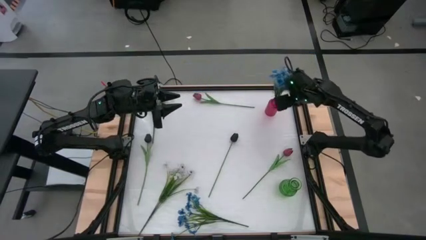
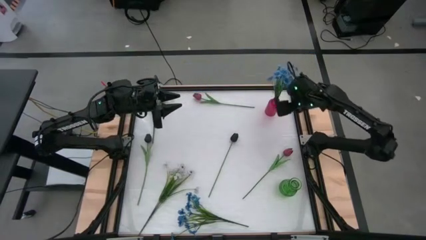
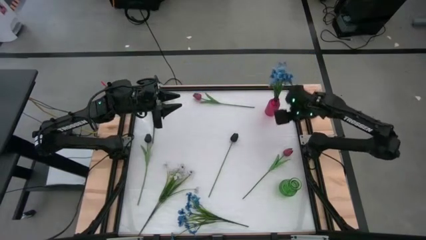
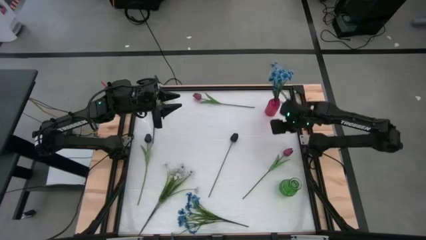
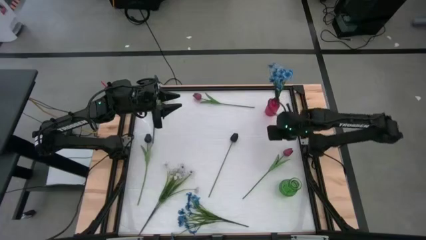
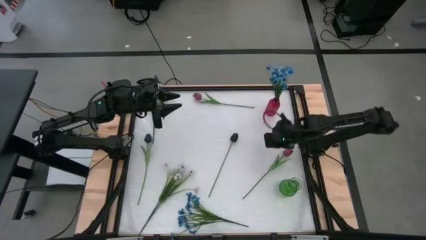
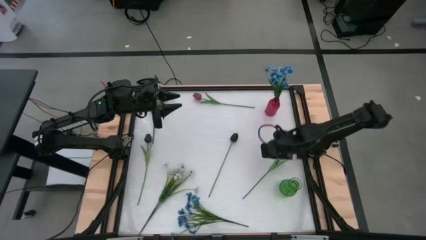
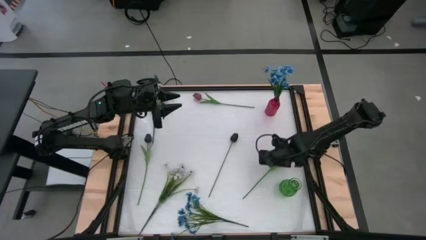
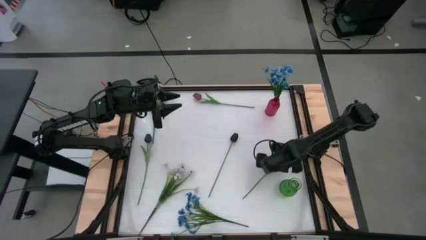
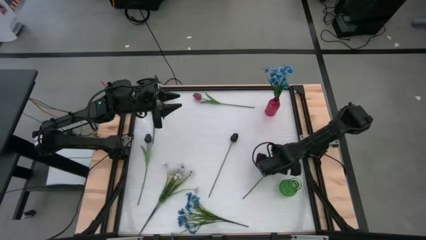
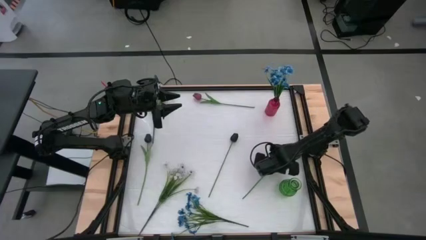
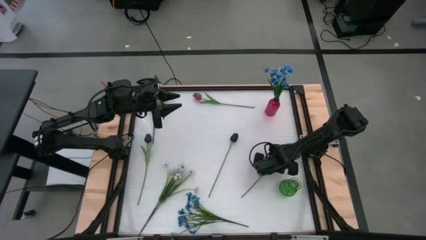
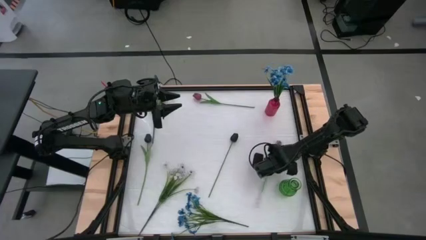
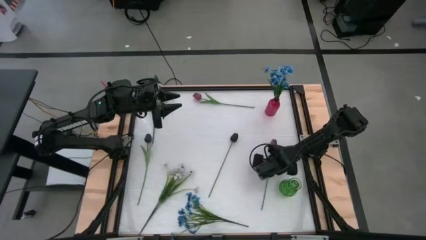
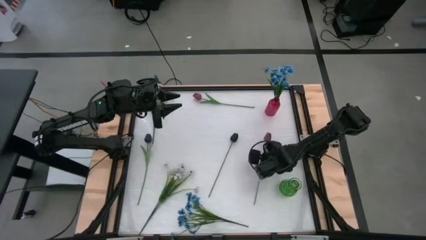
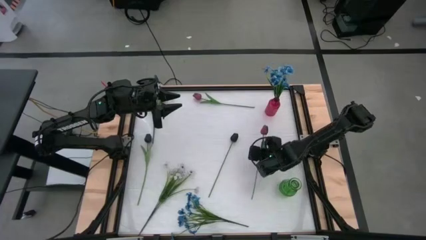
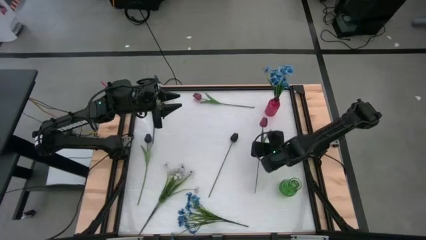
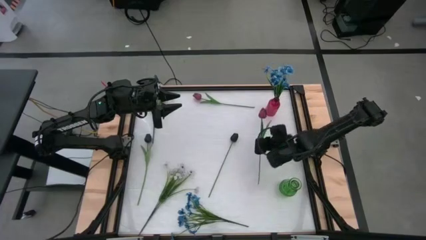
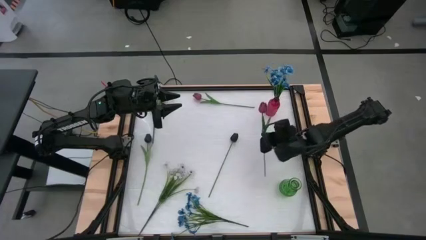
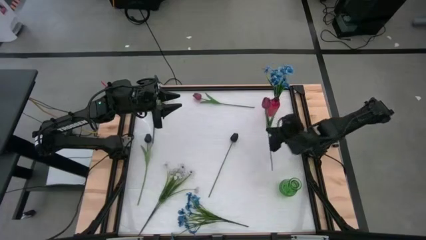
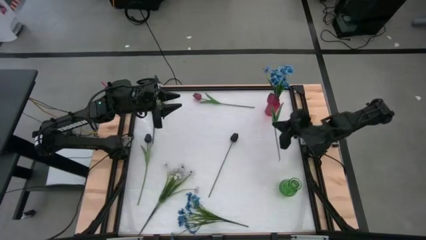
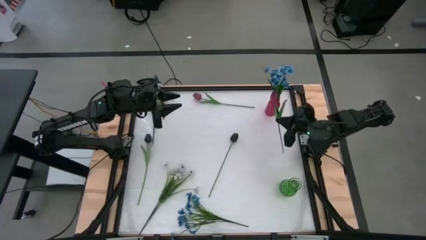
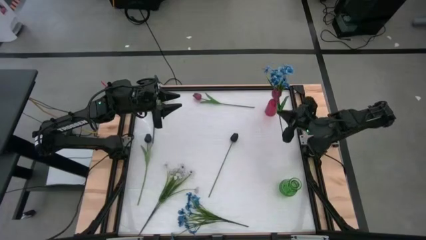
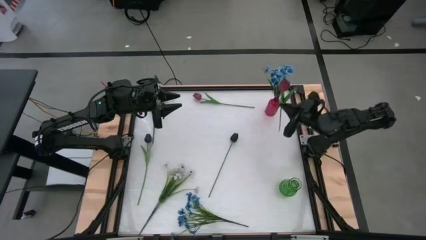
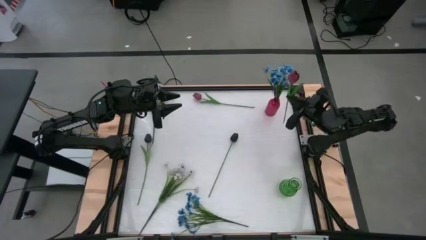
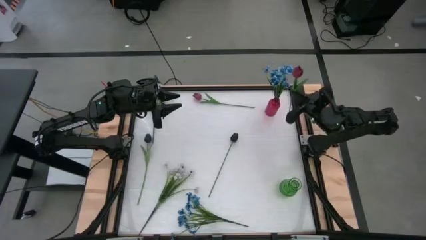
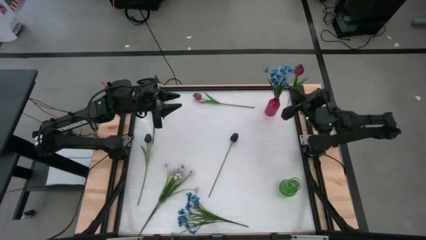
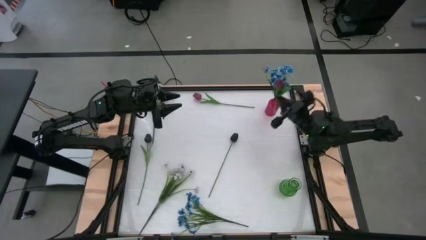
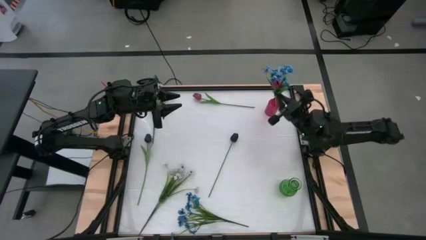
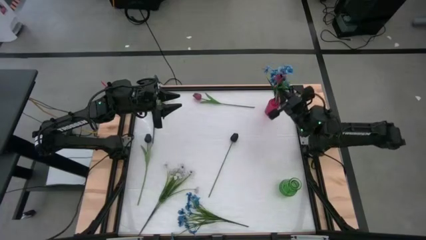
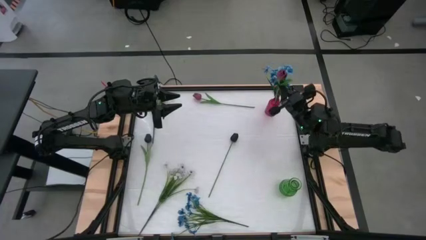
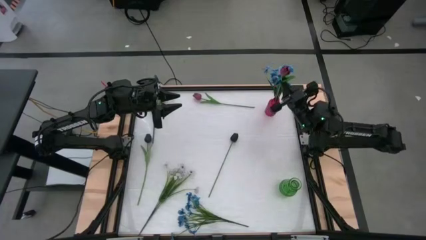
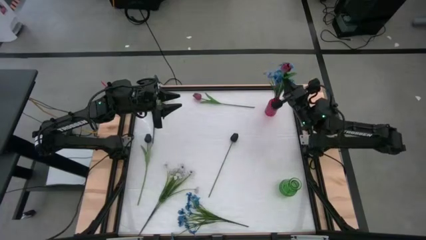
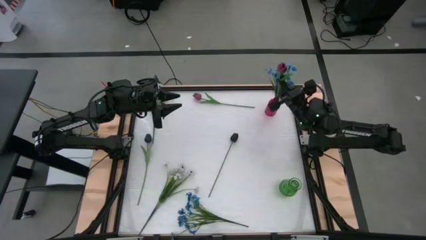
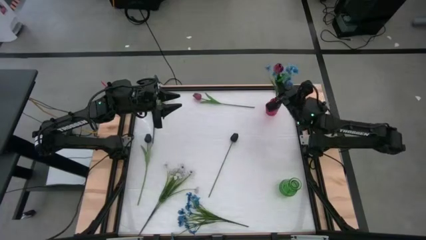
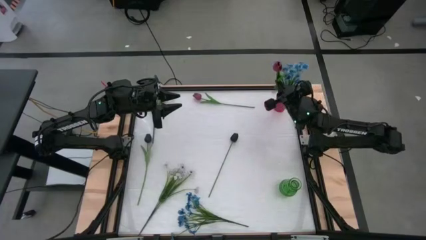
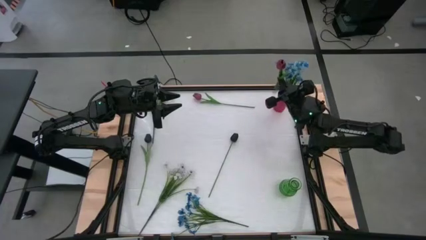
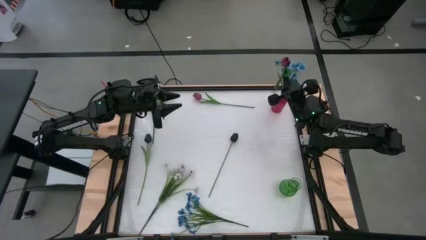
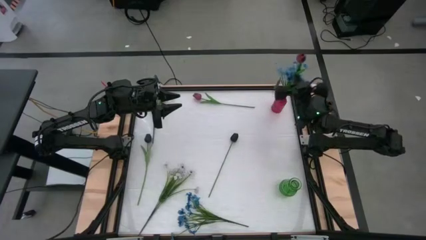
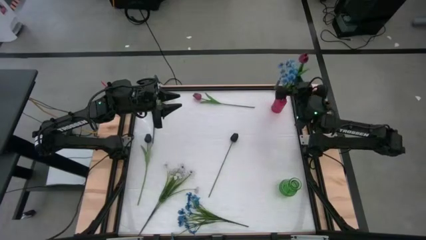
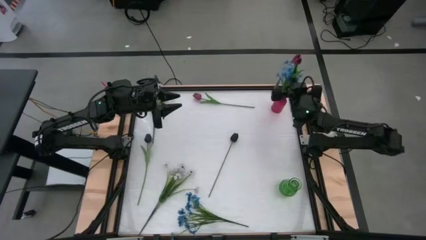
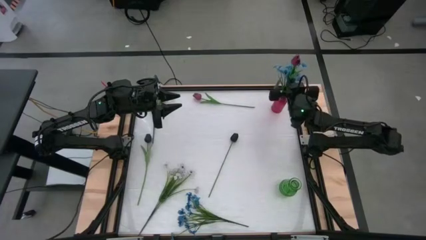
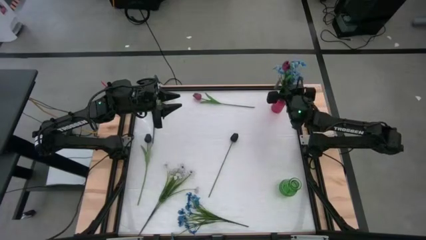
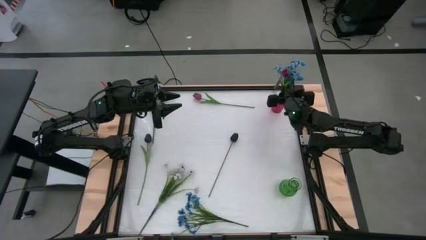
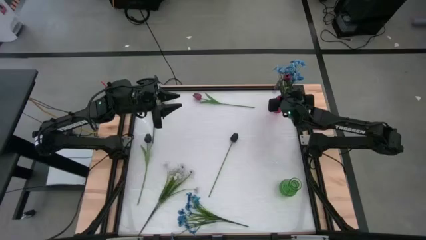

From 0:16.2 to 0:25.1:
Task: Sort flowers into vase by color
Put the bottom pink flower into the red vase

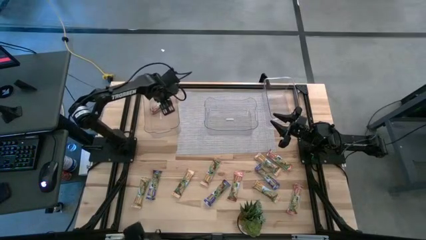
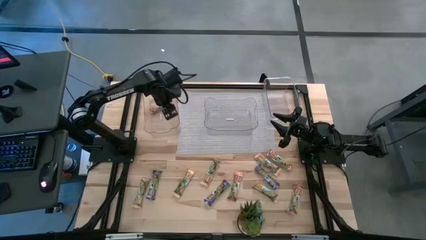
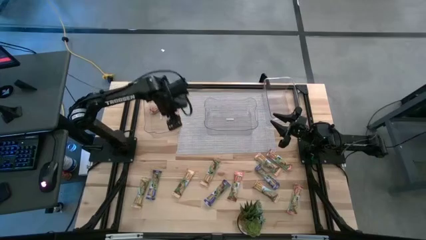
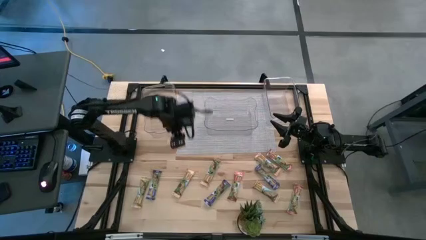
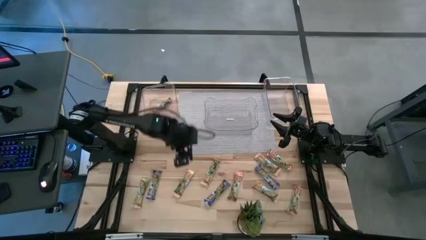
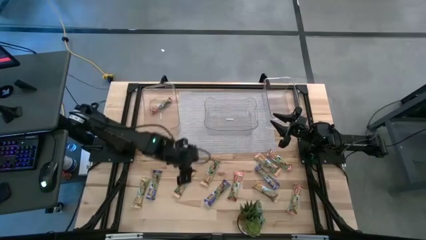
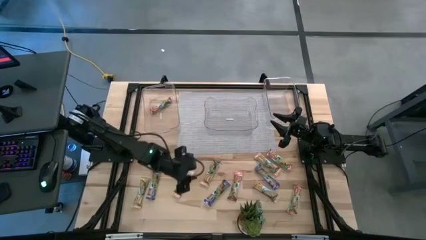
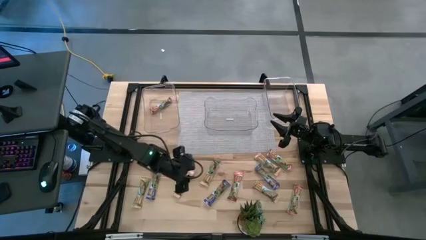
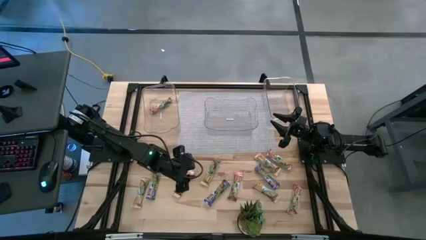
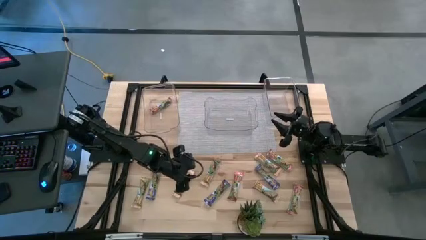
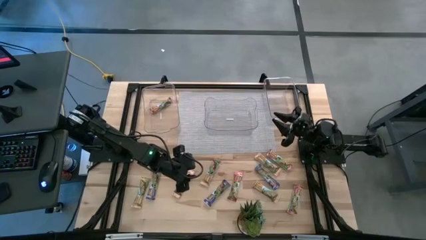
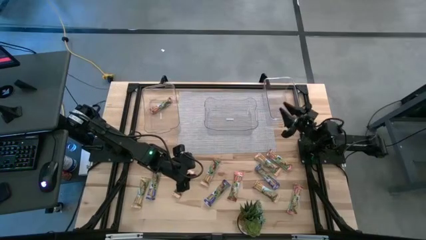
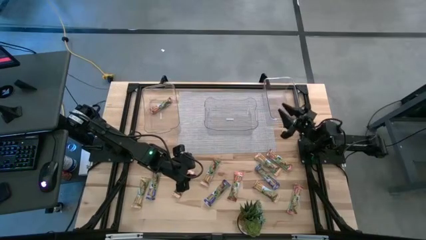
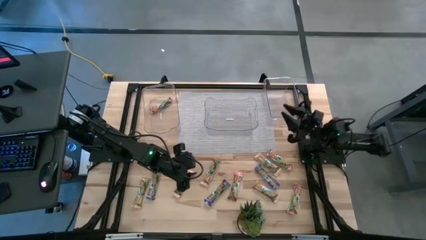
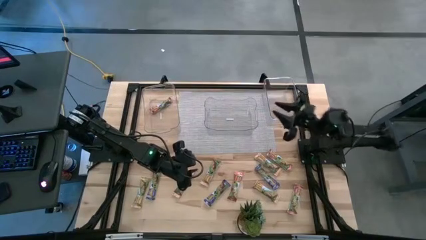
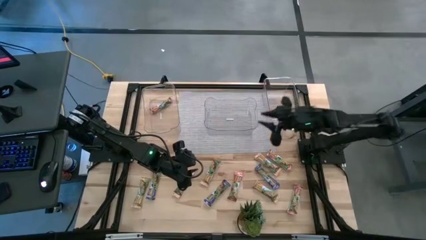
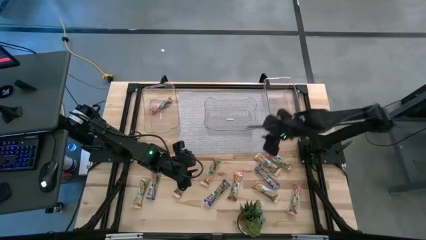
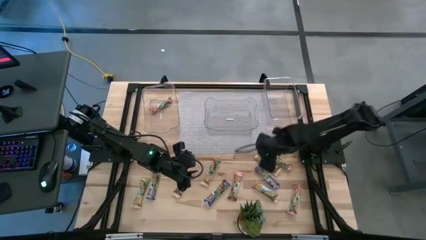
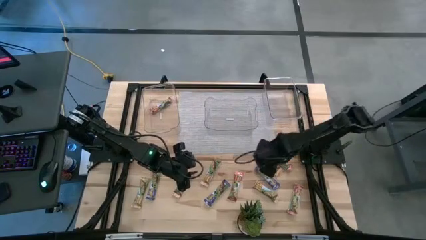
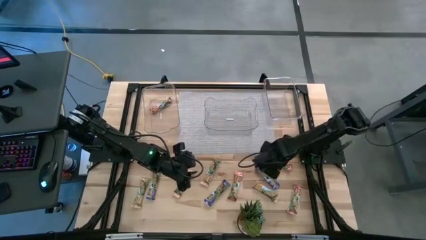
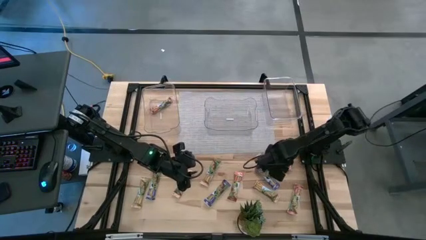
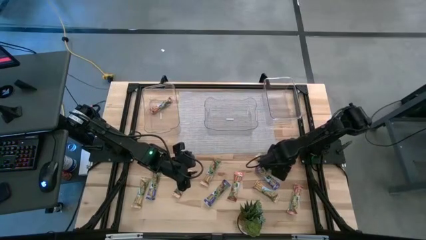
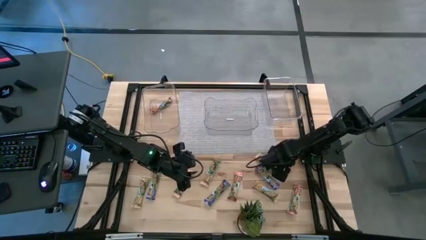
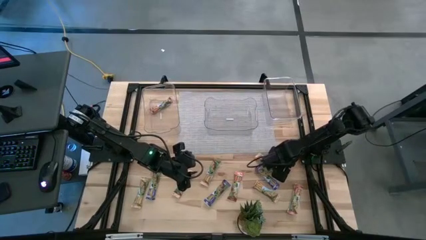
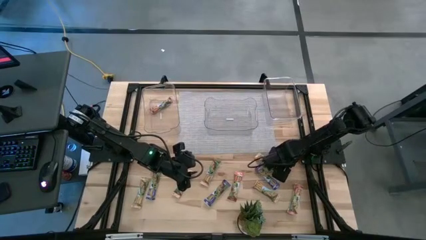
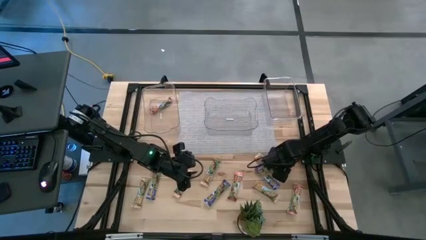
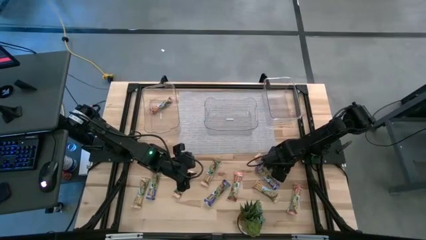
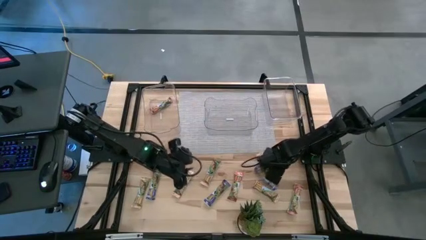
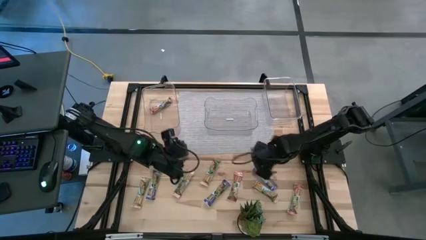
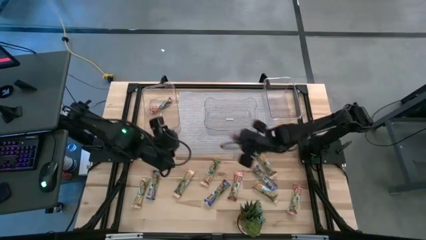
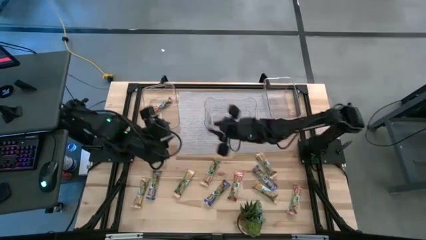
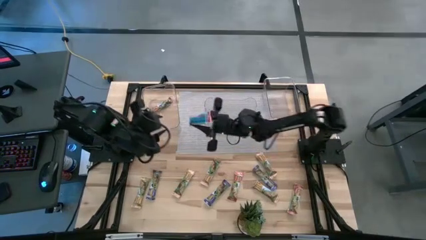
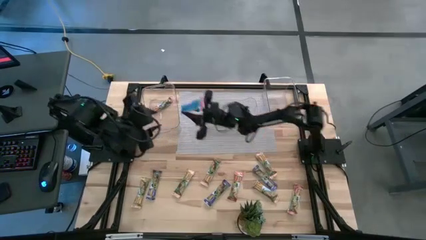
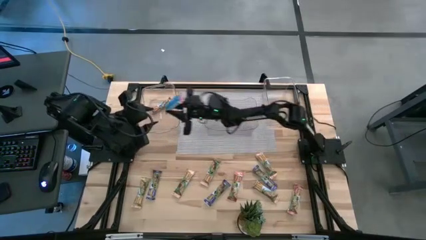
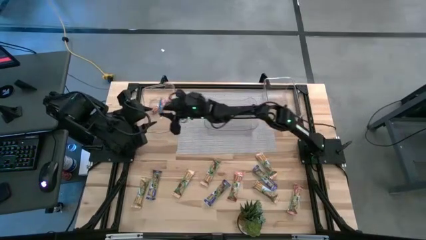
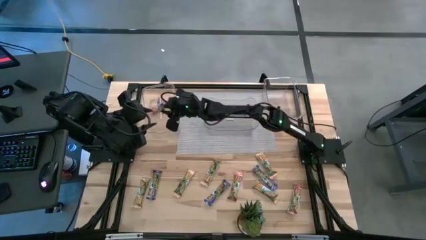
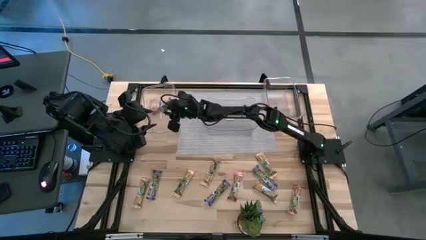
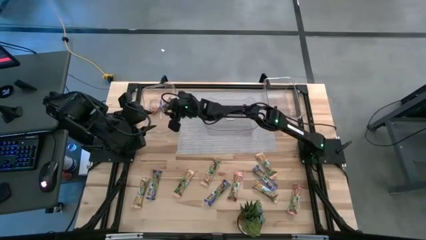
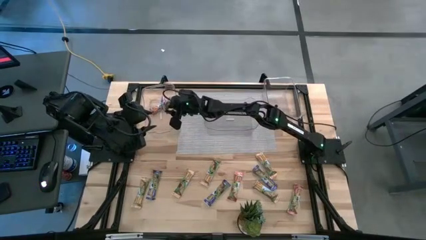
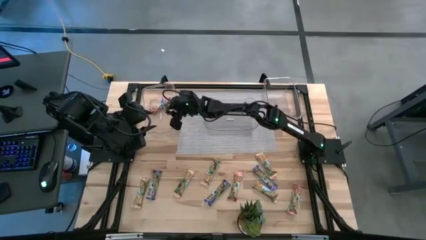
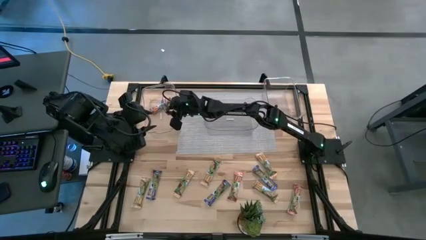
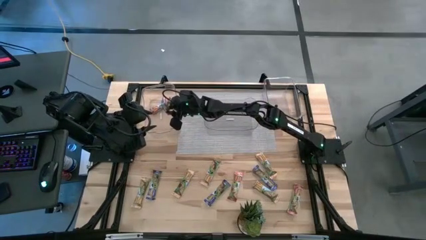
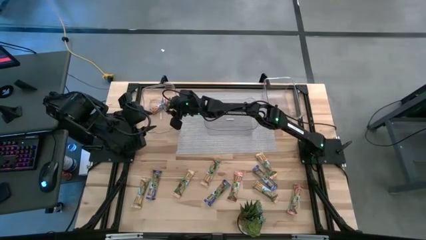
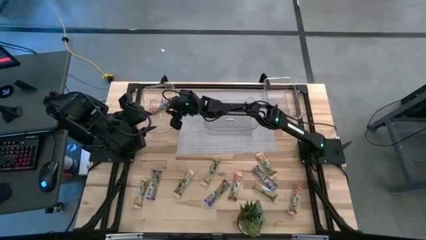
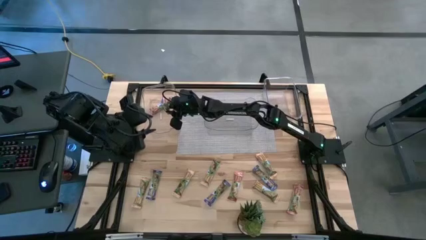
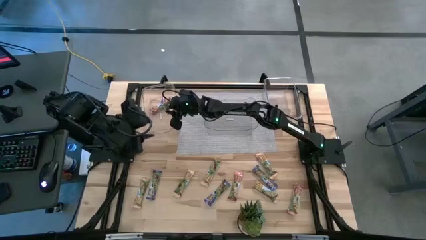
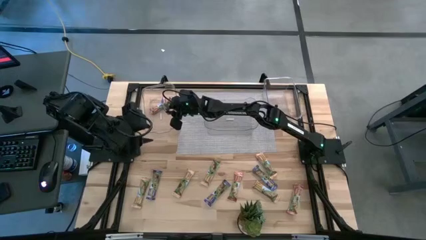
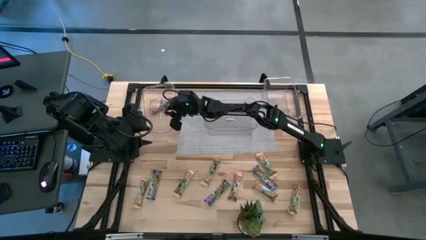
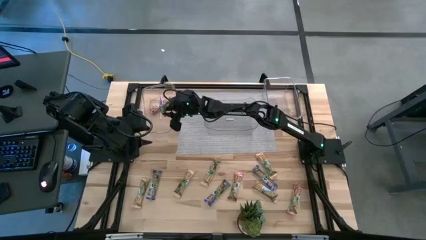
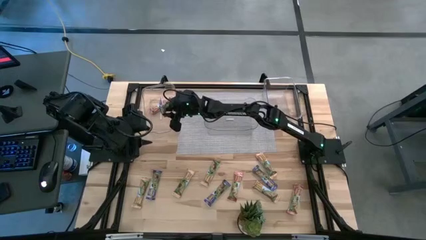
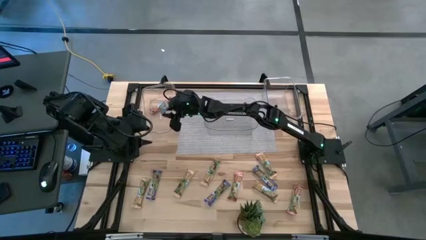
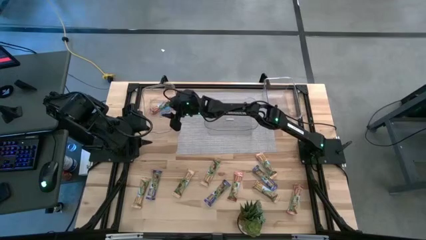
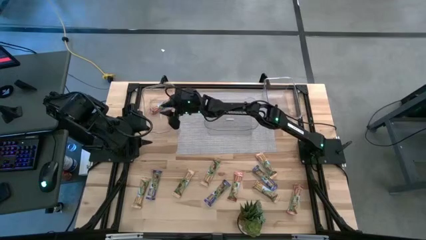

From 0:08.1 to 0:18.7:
Task: Pick and place Granola Bars by type
Put the red granola bar into the left transparent bin
